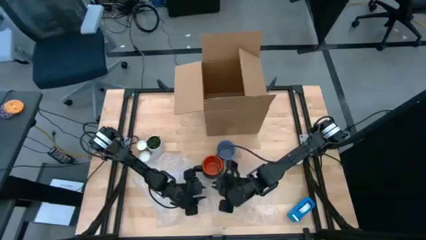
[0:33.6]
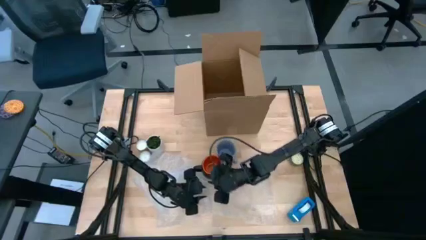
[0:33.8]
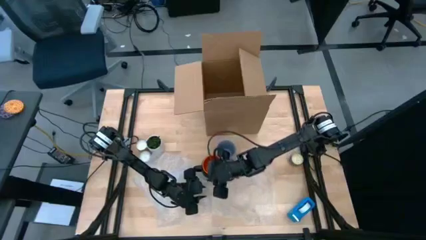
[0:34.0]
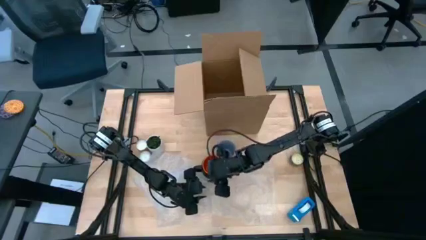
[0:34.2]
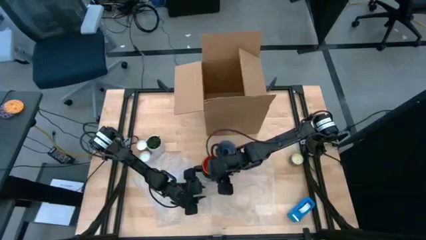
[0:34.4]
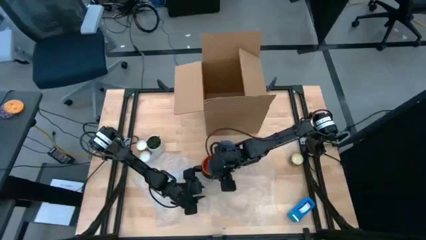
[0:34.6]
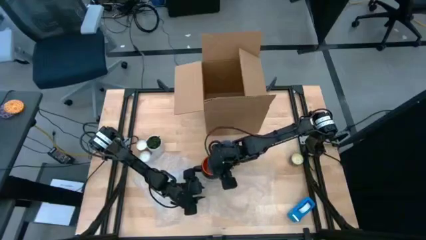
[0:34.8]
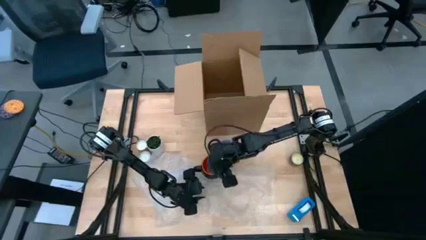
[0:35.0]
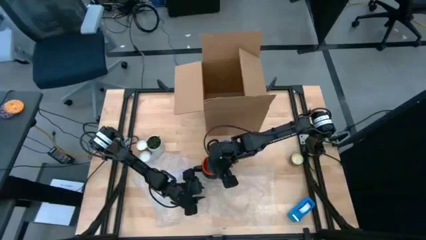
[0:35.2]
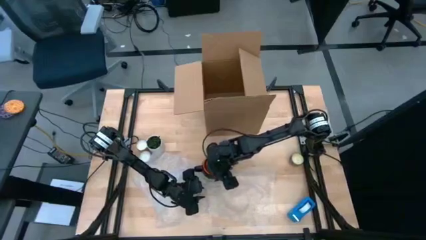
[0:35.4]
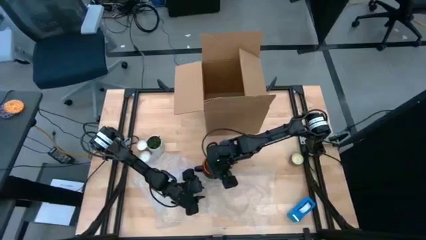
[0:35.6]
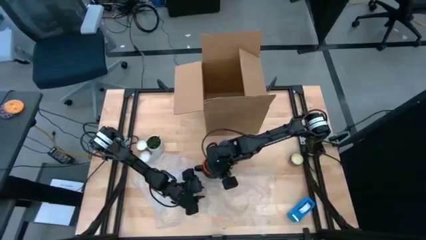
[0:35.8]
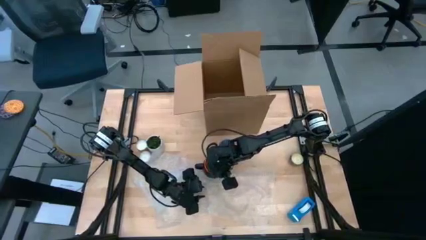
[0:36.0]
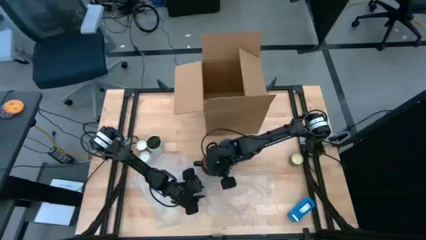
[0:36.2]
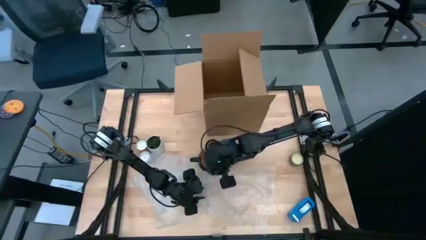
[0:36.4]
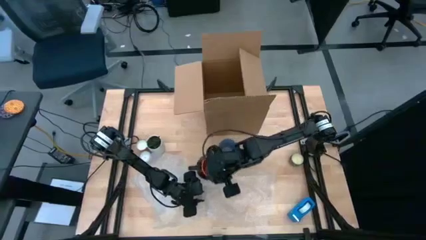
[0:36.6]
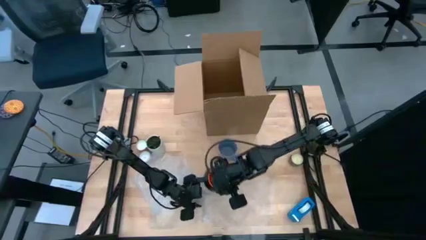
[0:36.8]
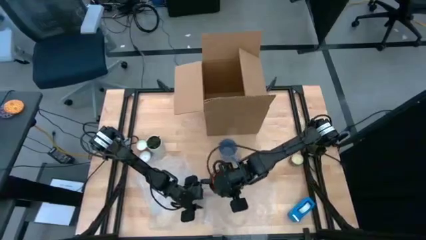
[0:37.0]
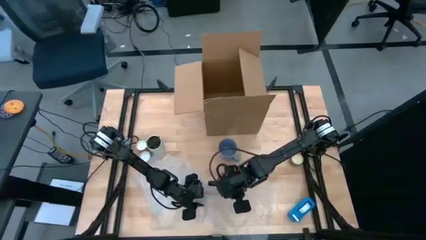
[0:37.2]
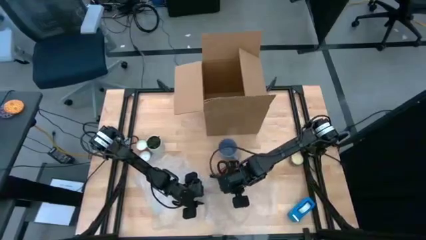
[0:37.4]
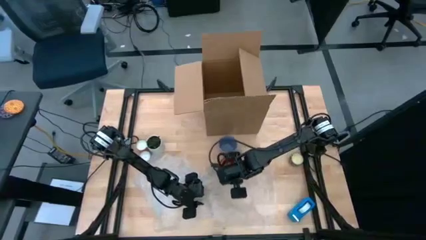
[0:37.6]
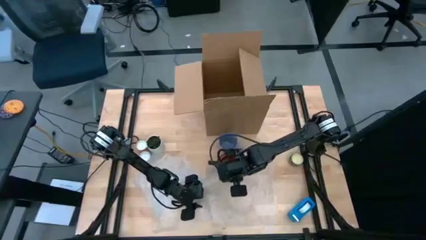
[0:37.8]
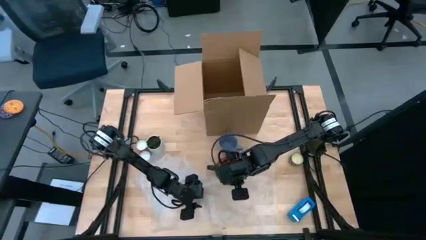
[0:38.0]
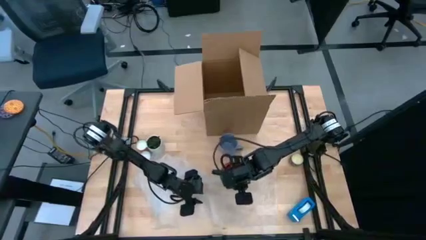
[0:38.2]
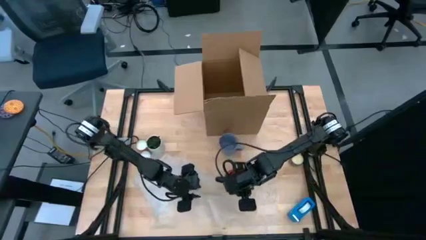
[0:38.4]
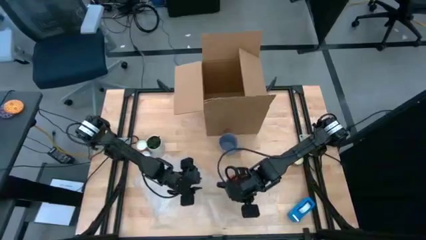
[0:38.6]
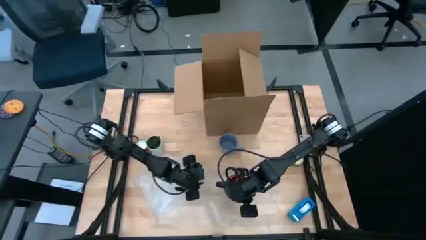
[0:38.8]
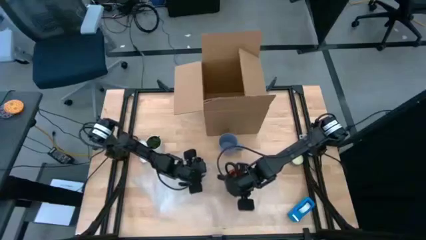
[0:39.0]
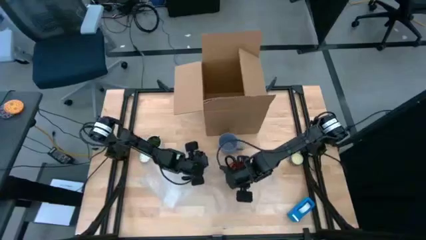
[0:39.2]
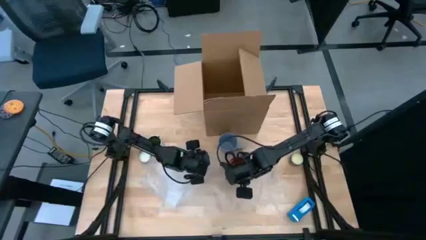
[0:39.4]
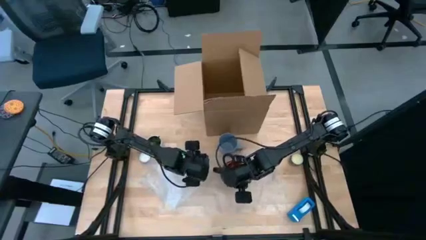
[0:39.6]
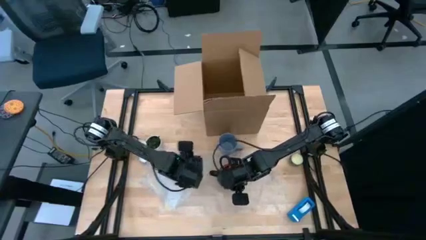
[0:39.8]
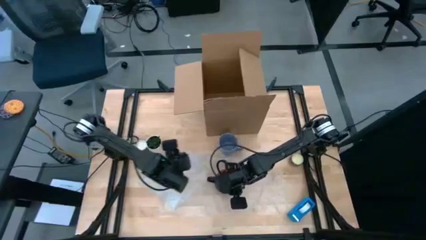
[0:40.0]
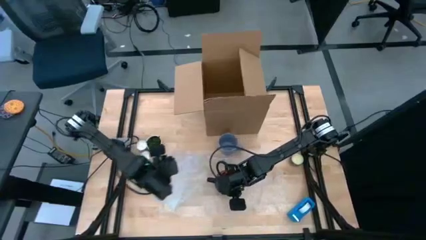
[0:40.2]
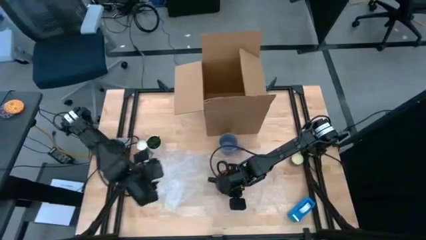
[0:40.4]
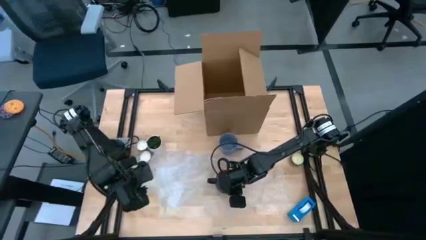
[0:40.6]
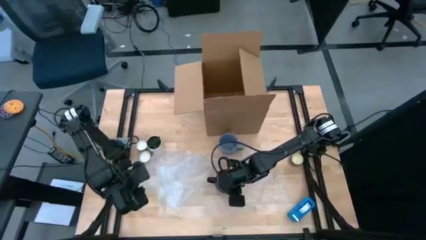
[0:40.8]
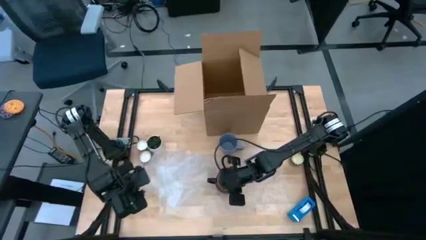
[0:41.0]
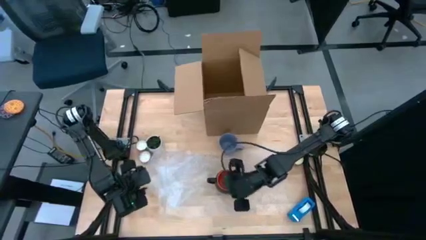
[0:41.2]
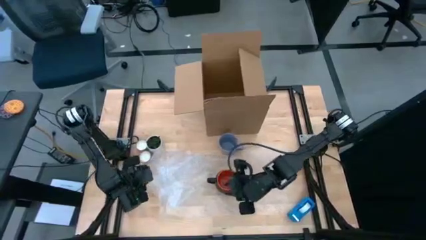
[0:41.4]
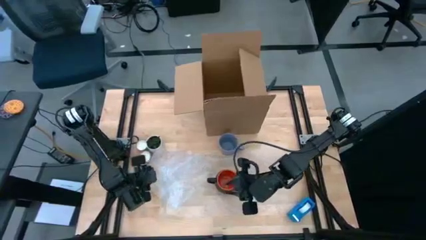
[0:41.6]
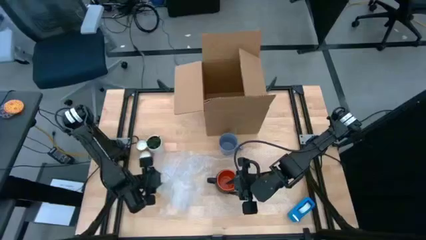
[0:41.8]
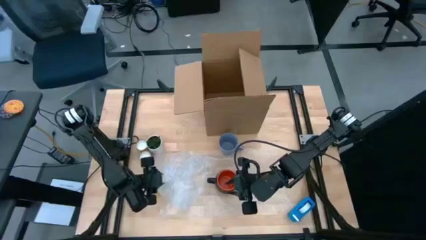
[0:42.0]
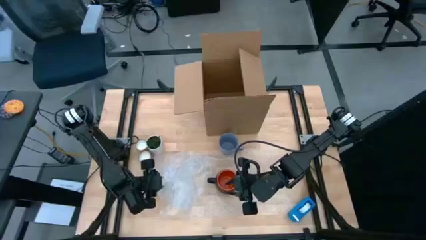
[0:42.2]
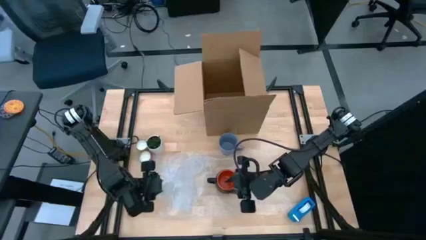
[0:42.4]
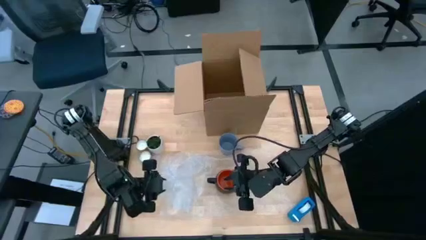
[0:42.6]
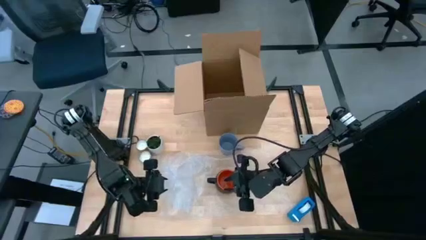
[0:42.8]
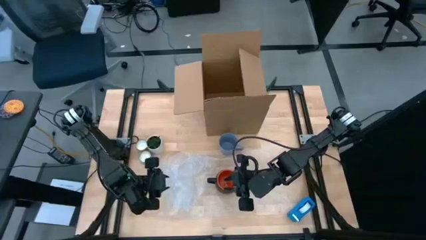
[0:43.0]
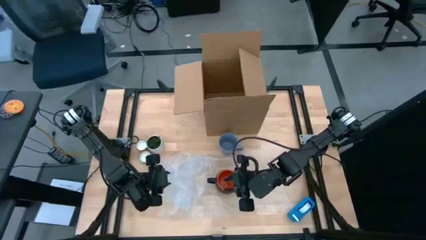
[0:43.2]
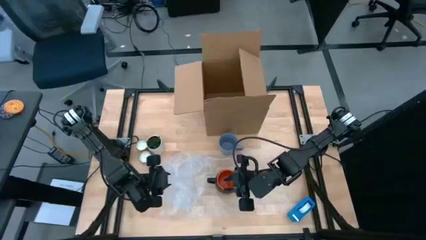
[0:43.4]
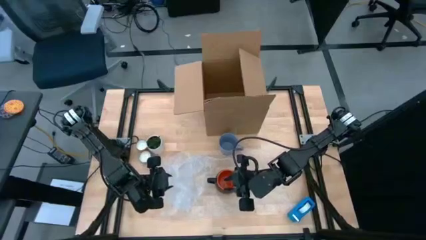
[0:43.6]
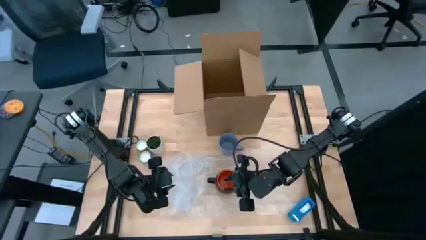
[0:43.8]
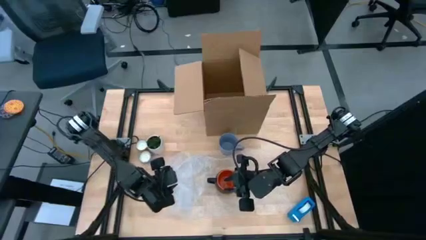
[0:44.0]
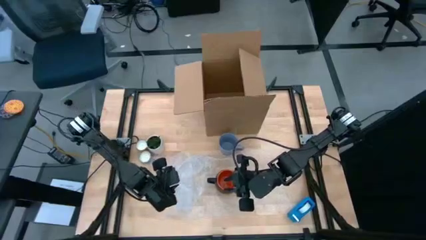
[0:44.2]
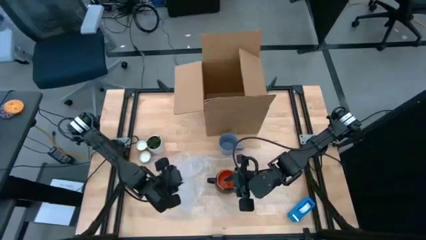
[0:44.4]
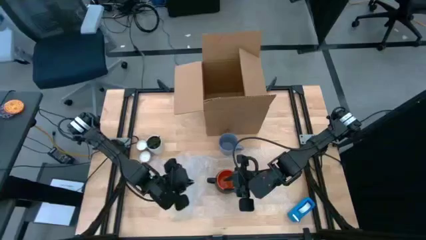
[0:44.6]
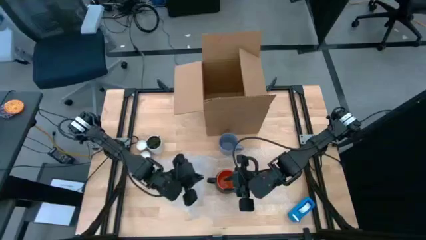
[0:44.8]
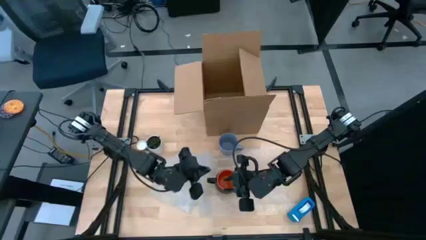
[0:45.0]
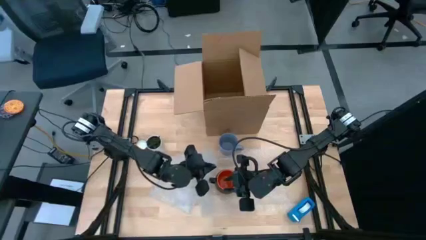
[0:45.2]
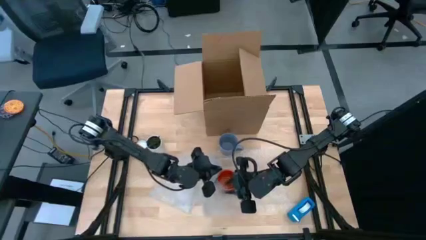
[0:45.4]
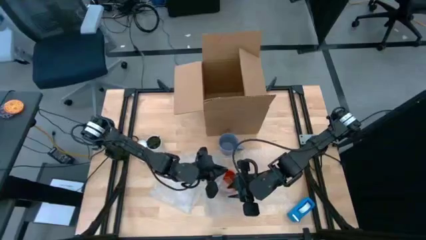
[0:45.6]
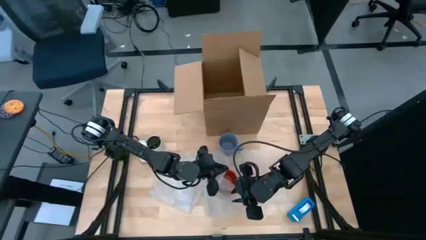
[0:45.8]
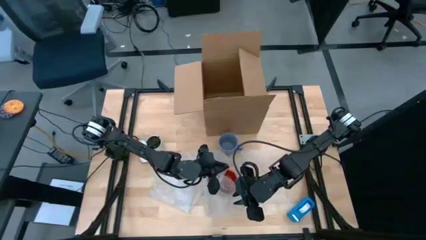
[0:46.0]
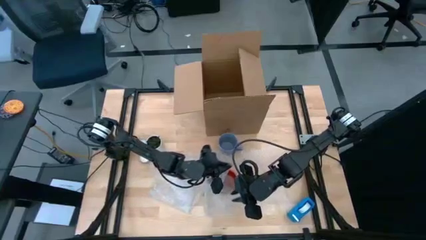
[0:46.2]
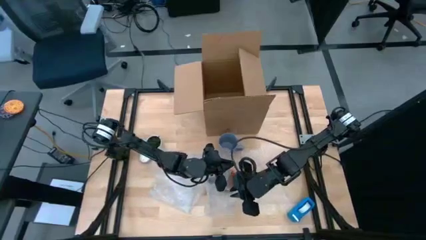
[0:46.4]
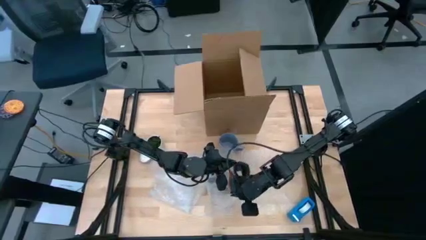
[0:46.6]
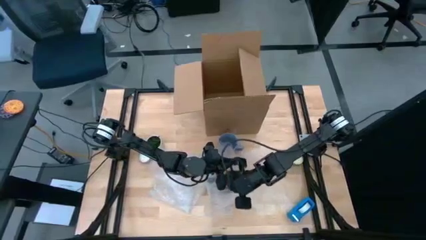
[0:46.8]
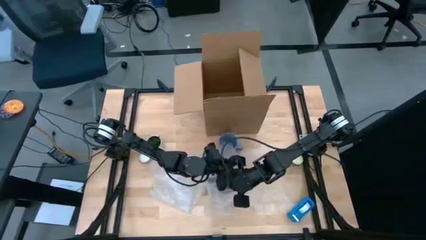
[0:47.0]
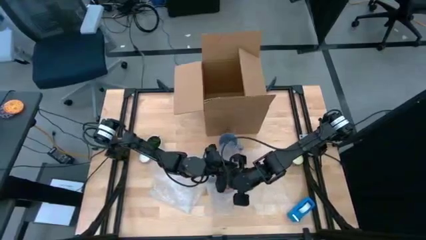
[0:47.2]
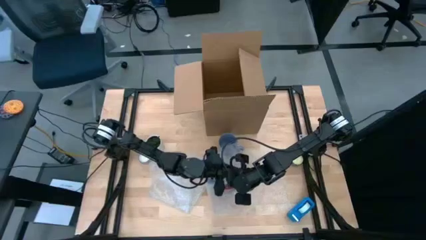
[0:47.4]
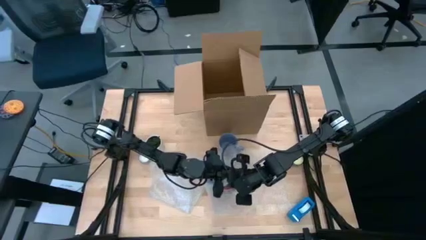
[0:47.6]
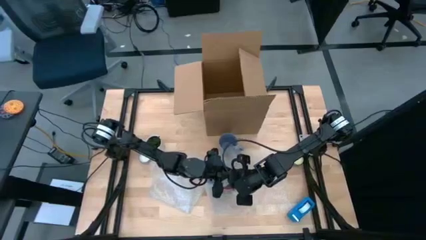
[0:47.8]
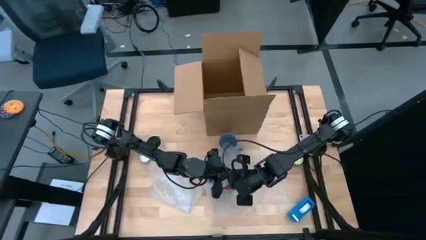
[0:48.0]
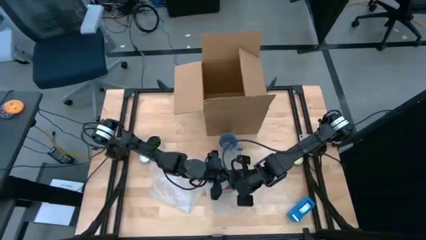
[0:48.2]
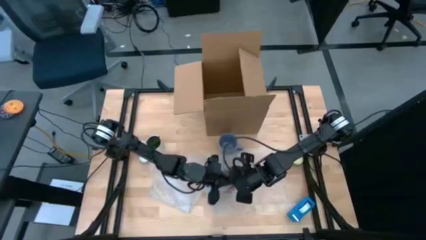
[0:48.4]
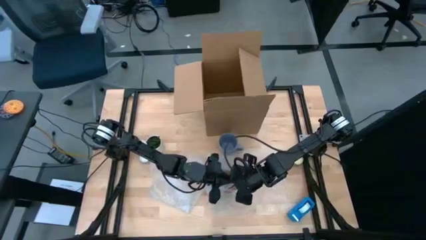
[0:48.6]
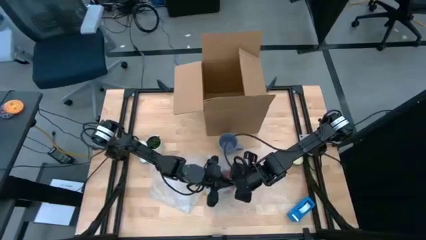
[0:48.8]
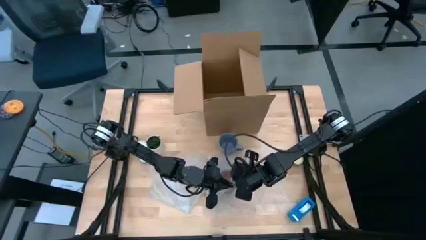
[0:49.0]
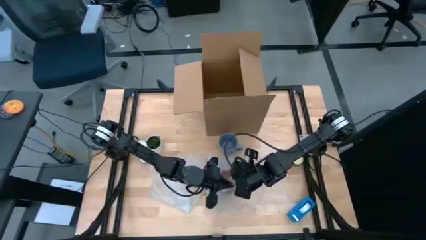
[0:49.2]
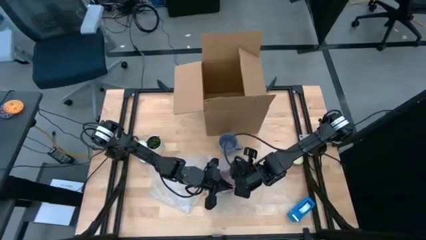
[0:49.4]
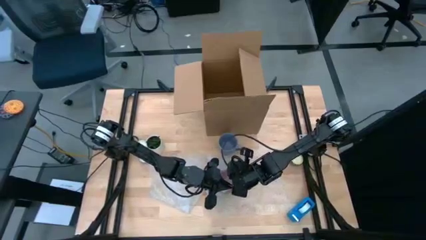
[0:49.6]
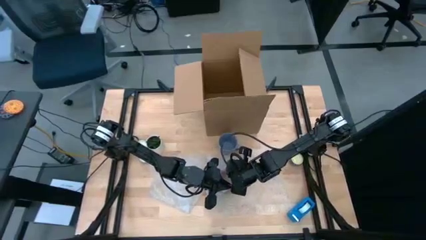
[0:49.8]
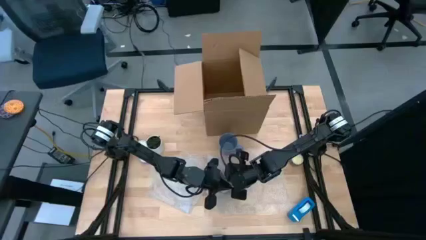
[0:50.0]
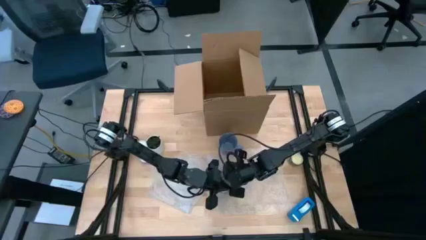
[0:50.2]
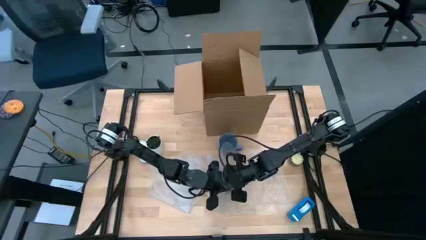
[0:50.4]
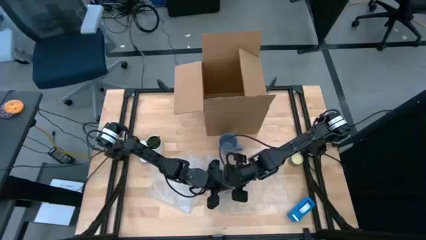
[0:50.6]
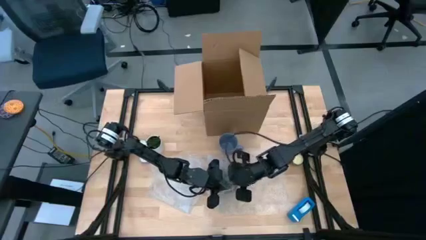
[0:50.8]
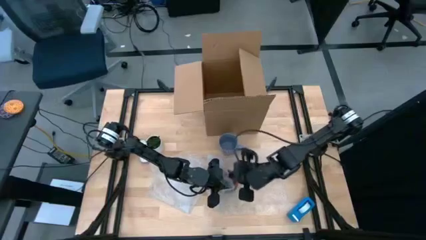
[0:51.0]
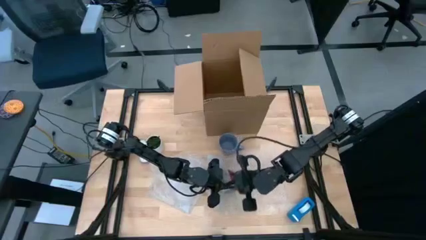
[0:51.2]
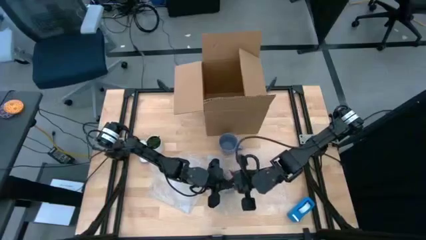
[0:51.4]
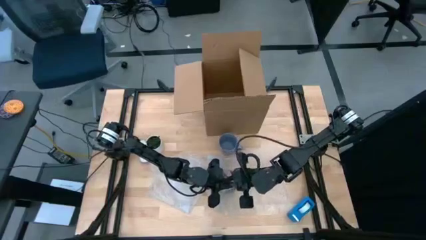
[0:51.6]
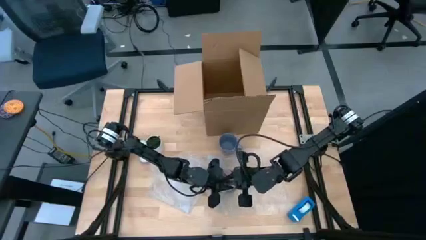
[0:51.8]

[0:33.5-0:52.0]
Task: wrap mug
Wrap the black mug with the top bubble wrap
